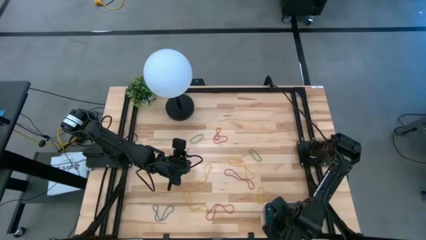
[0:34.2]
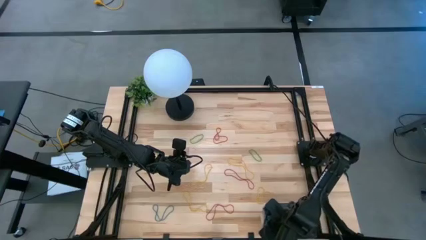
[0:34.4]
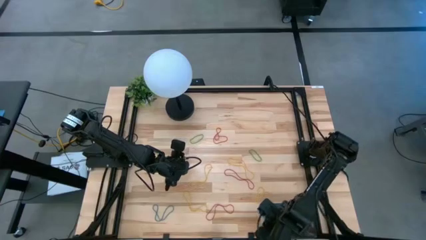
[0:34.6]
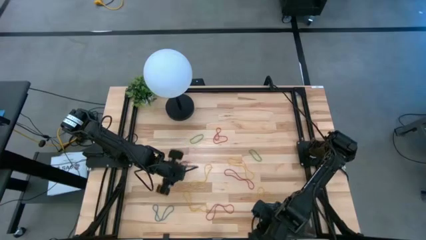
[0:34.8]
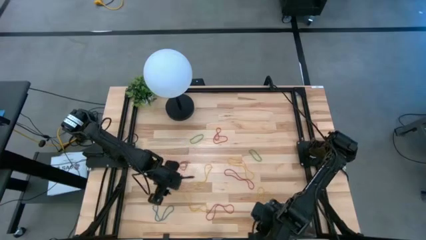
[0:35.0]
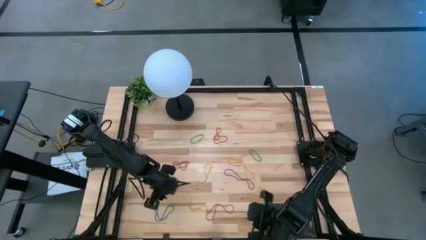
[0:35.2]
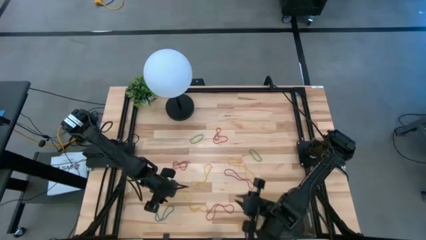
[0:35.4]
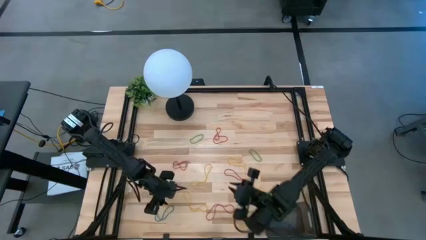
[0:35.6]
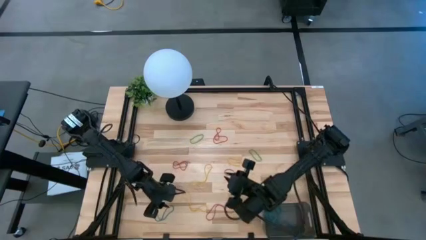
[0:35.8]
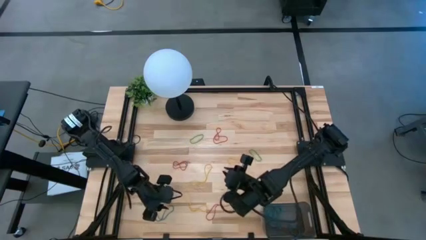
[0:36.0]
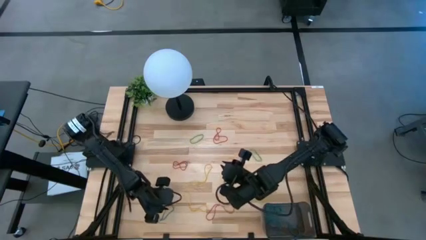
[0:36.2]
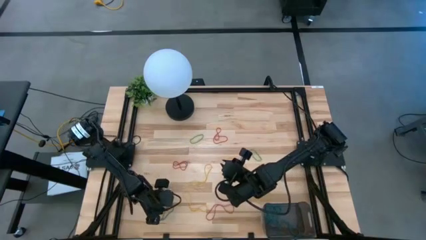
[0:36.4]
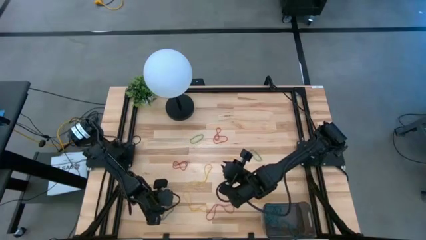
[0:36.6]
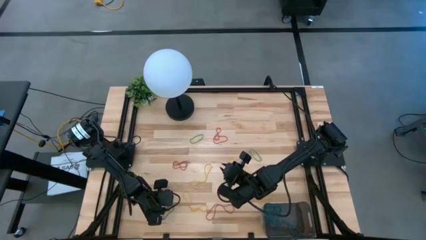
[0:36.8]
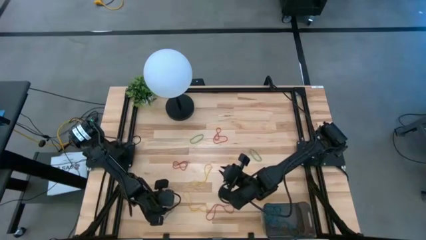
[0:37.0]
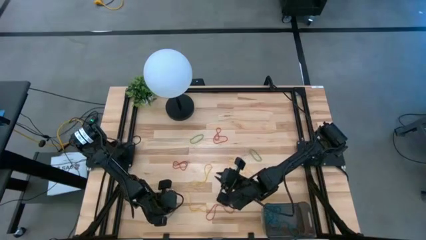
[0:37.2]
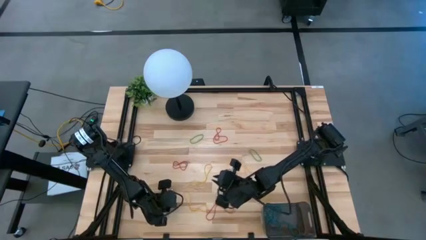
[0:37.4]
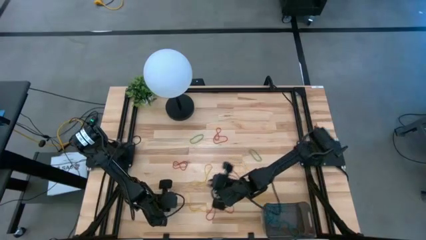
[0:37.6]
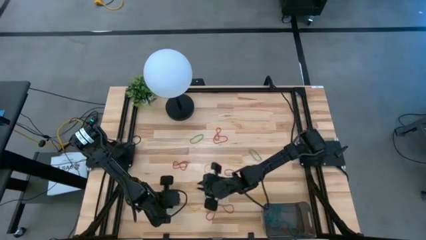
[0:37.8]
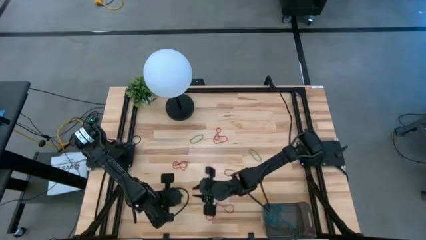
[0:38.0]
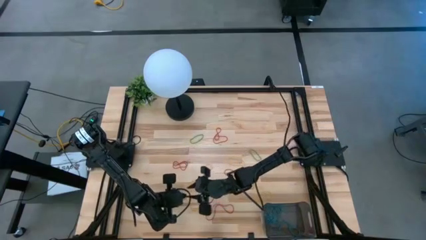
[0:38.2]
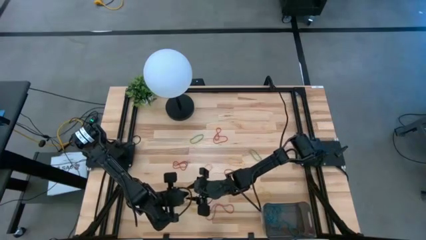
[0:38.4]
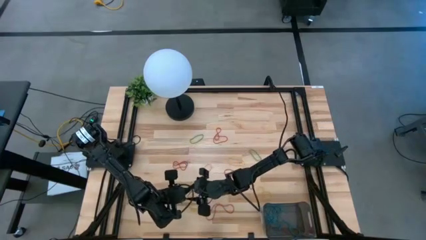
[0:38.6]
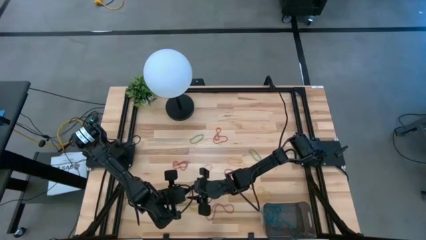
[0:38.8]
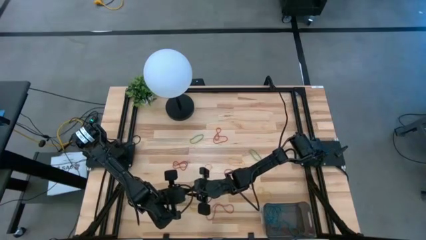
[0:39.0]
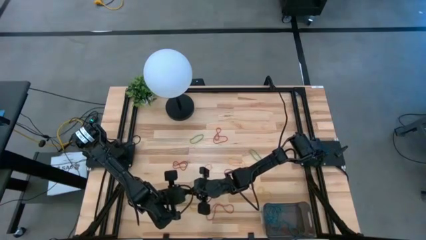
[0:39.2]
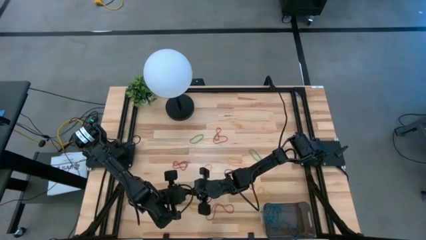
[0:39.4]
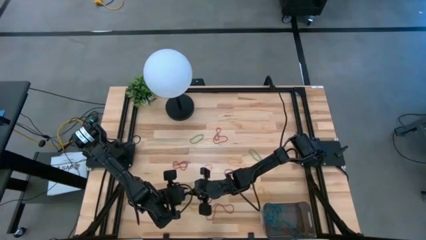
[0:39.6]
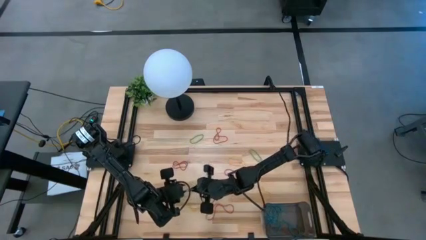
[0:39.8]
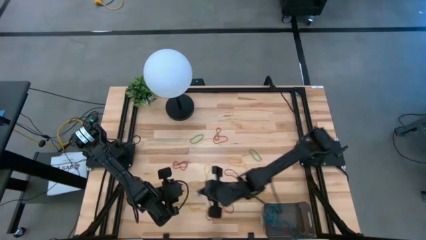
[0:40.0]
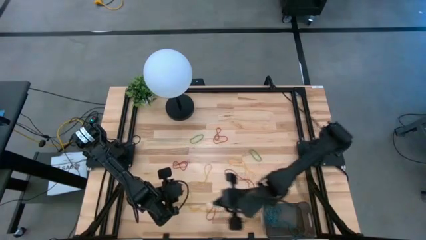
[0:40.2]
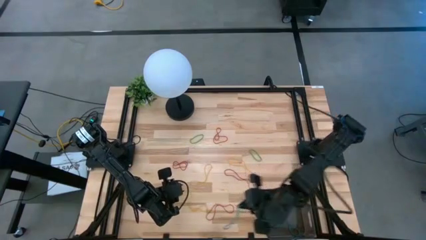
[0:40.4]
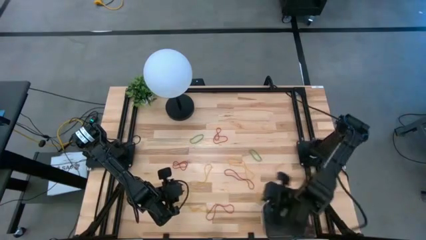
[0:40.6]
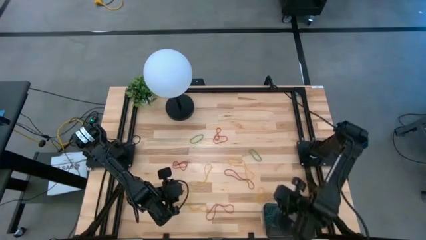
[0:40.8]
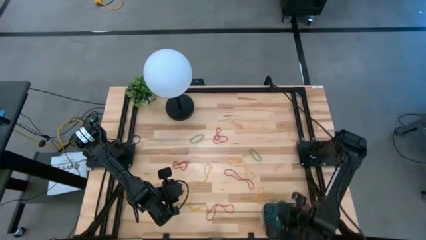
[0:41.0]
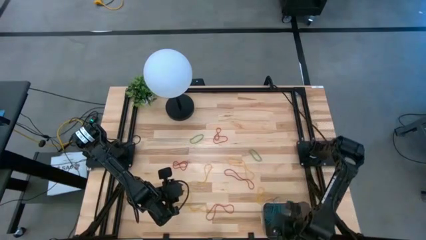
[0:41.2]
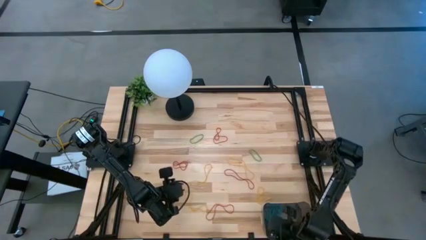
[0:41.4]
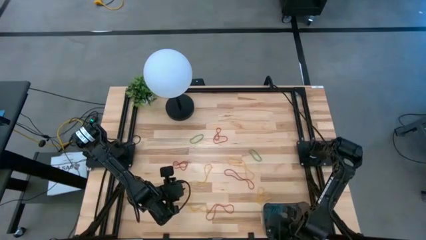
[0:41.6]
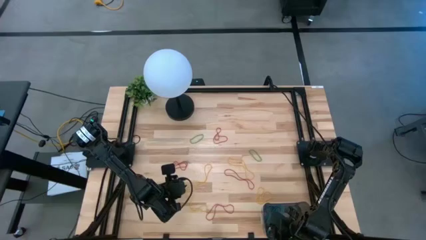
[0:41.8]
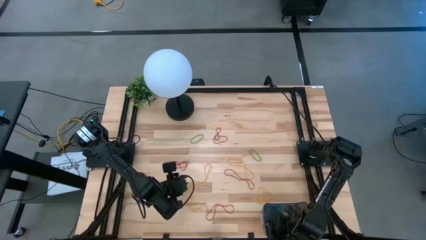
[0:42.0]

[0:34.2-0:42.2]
Task: Pick and place items into bin
Put the blue rubber band into the black bin

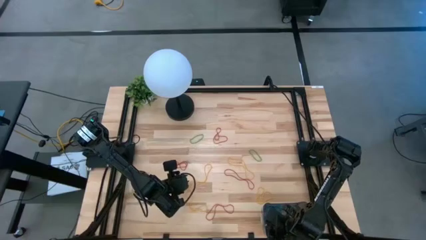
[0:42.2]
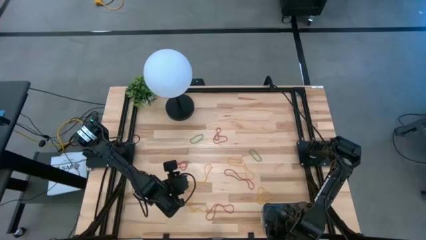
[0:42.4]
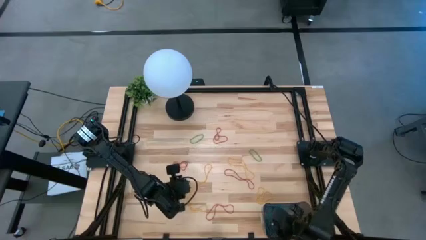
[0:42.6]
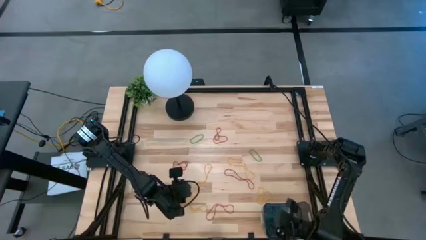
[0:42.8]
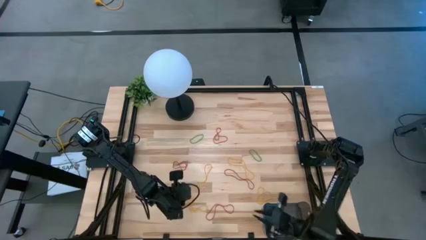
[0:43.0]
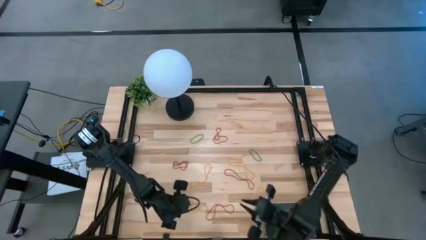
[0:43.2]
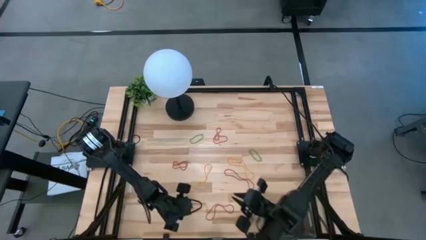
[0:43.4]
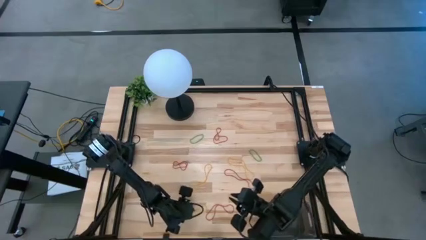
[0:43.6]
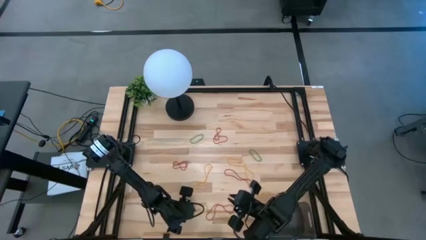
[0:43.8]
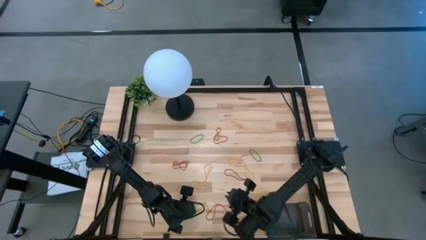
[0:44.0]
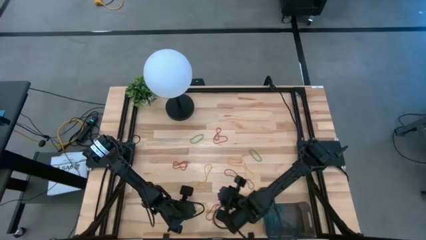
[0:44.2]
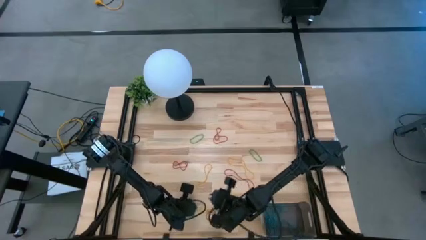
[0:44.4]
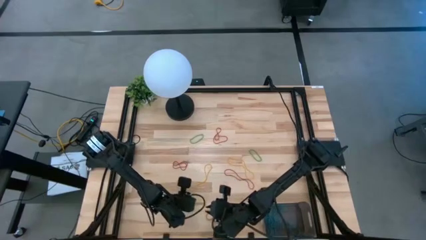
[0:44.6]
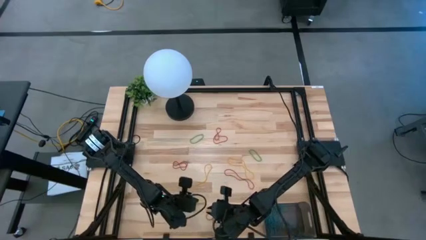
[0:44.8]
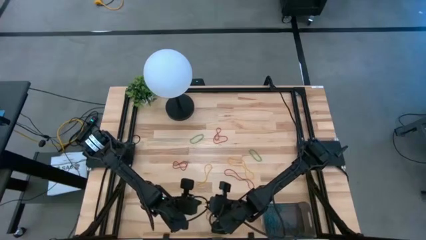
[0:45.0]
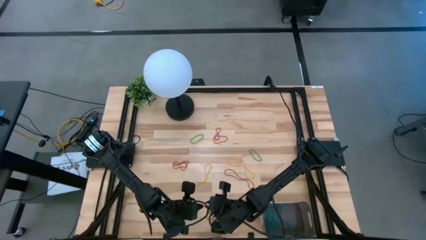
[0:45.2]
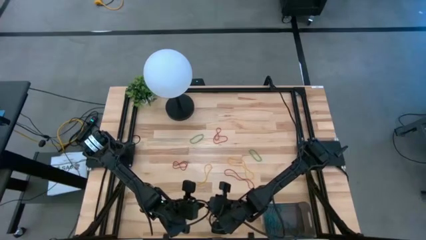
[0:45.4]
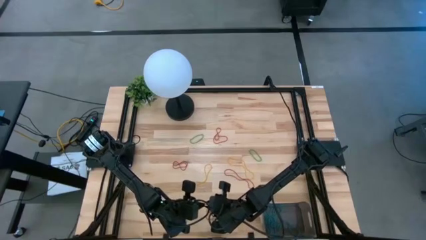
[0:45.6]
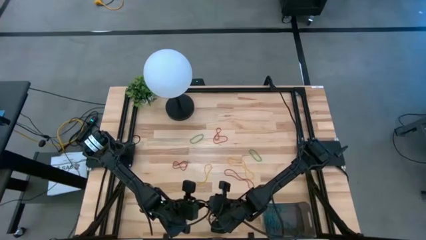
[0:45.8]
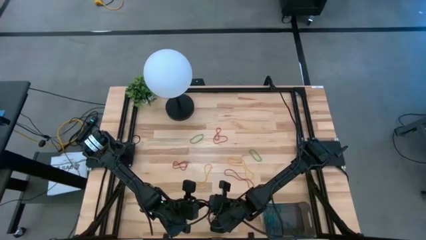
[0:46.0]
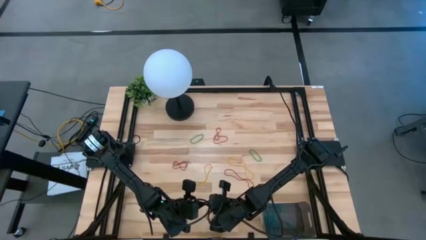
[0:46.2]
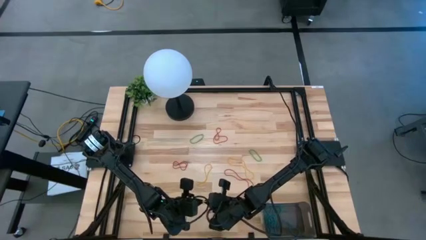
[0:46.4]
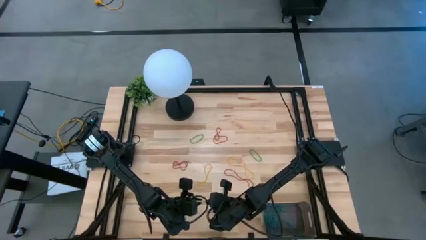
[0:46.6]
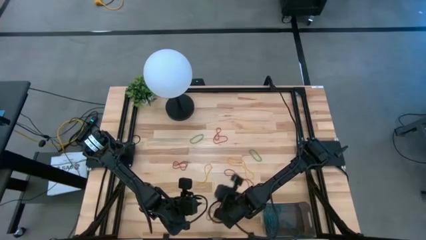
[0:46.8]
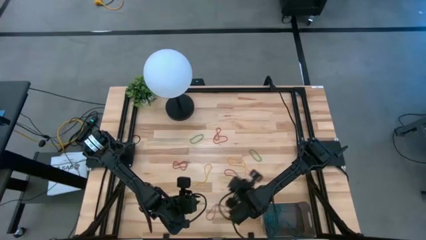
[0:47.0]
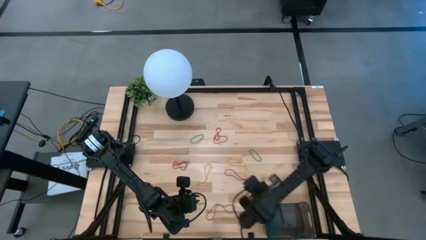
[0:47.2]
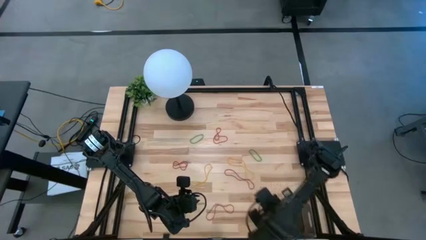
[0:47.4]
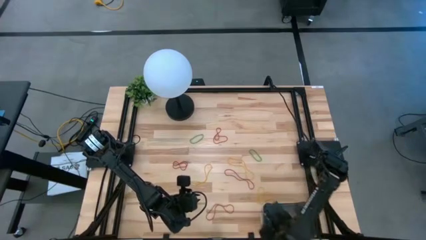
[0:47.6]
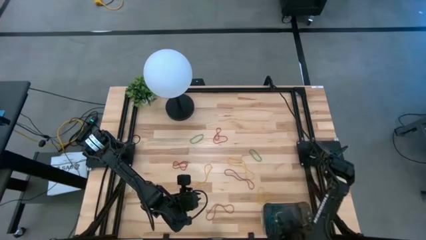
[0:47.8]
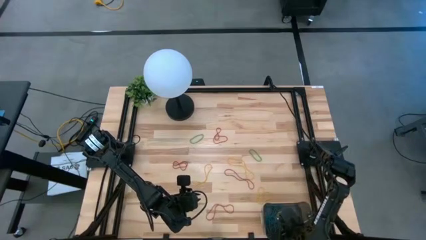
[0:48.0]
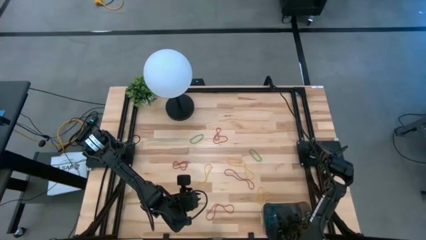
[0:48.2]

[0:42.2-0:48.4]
Put the yellow rubber band into the black bin

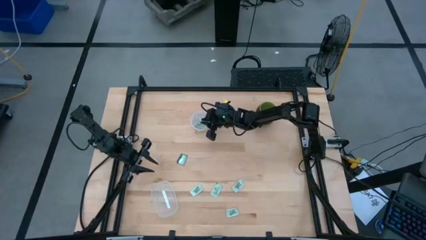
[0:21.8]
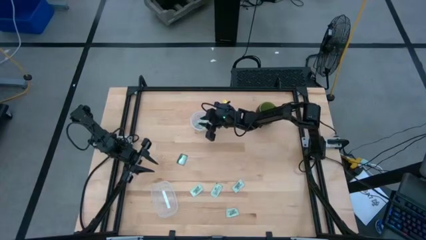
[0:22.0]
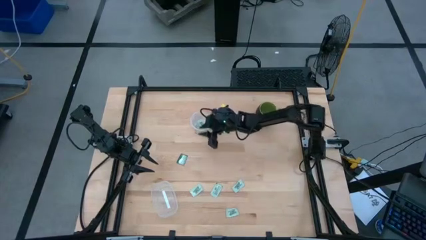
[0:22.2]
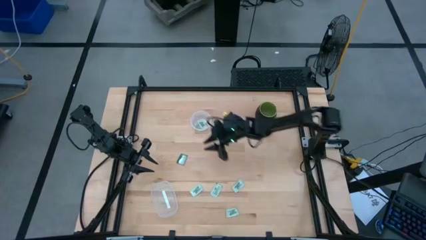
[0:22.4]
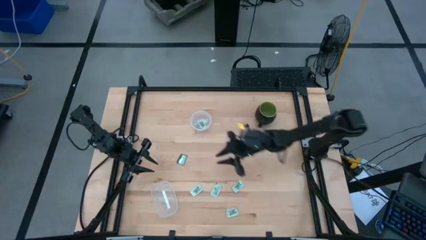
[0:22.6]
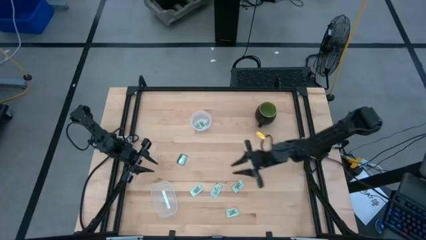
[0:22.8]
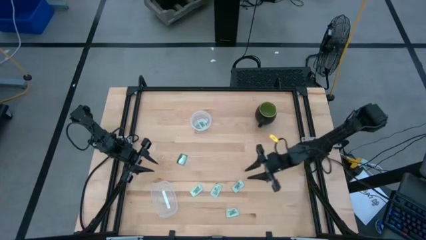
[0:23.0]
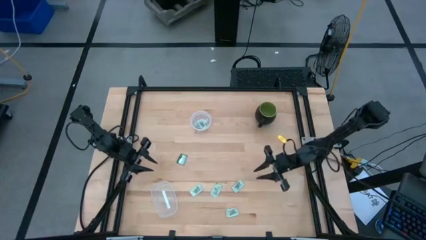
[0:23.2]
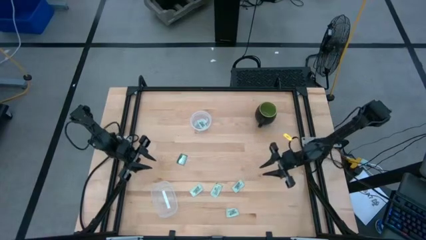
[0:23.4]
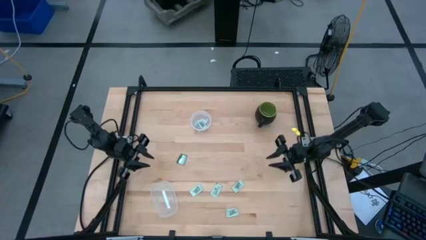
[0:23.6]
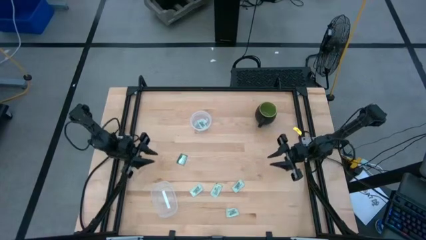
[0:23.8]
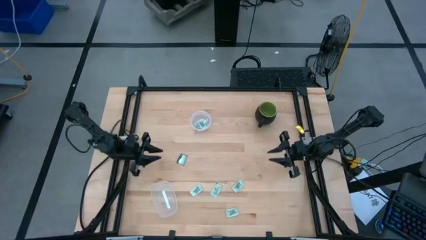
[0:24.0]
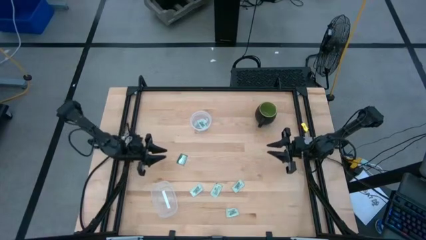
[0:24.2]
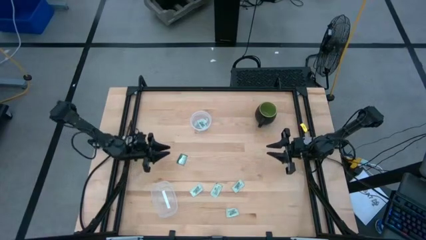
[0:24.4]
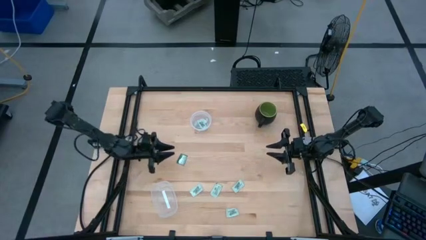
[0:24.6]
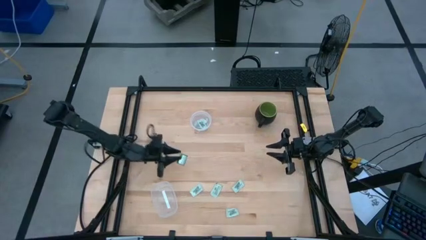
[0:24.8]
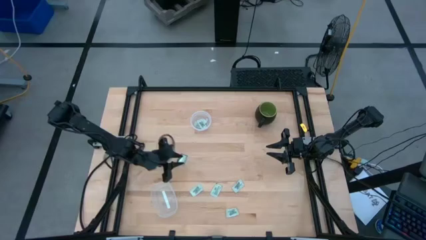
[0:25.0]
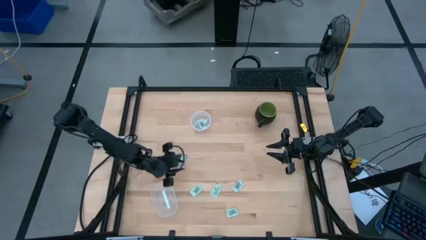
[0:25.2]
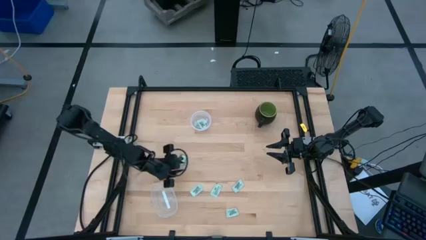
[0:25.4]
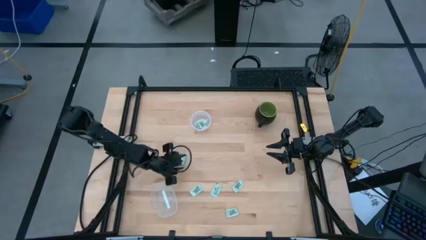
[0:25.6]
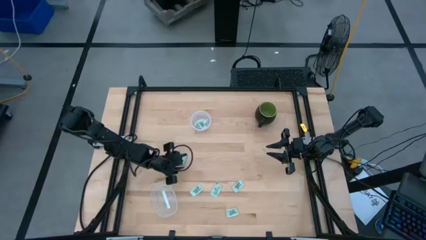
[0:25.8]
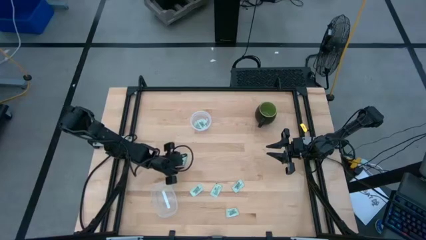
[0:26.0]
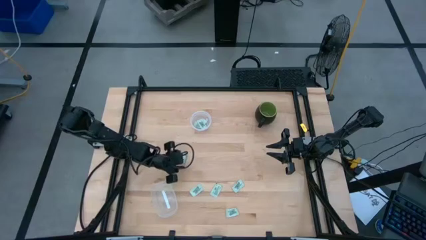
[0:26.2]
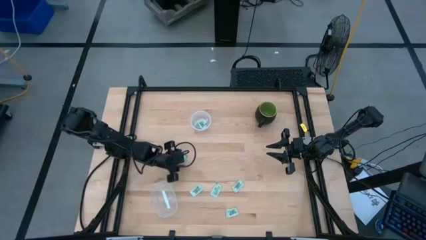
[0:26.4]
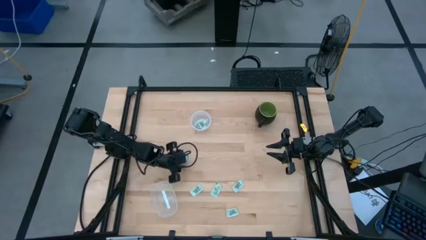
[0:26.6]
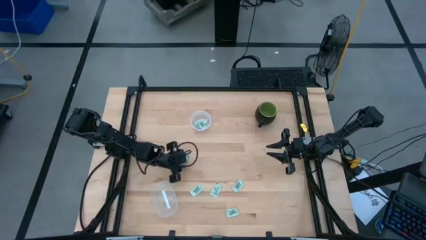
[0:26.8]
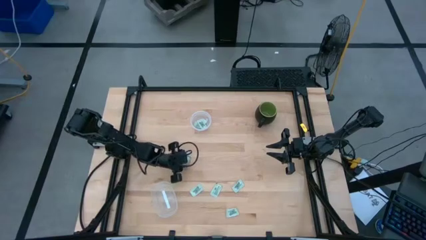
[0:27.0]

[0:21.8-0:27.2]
Task: Pick and place Stevia / Truvia into bins
Put the stevia packet into the transparent rectangle container
